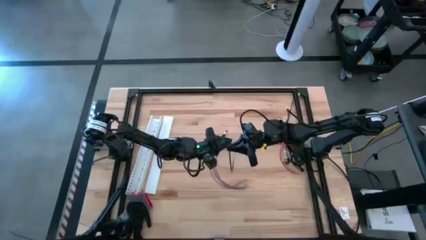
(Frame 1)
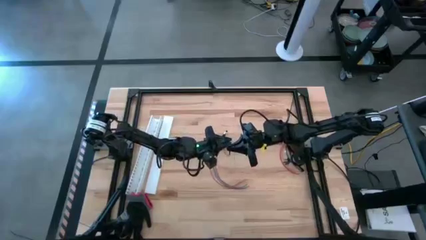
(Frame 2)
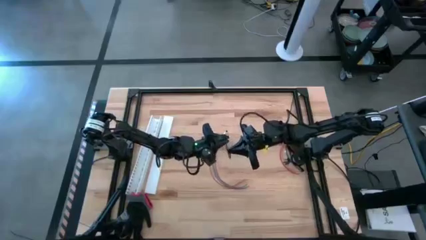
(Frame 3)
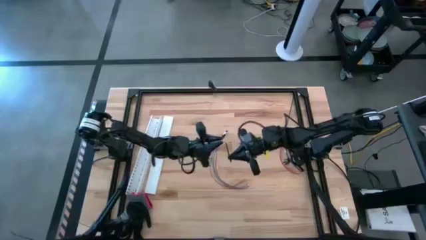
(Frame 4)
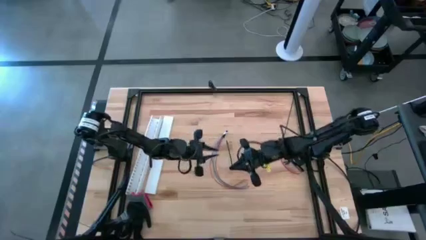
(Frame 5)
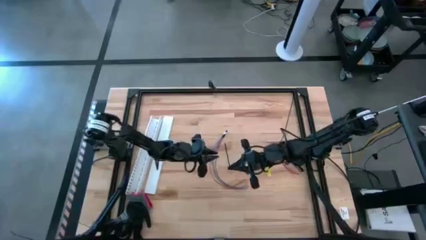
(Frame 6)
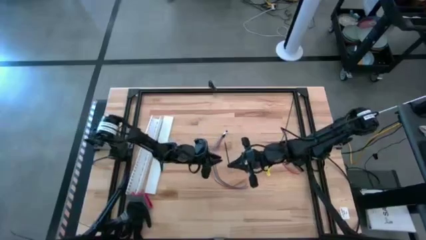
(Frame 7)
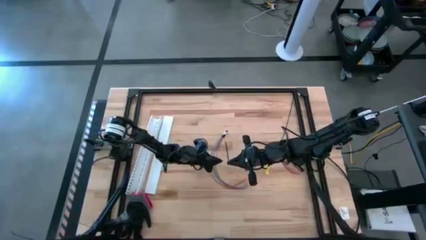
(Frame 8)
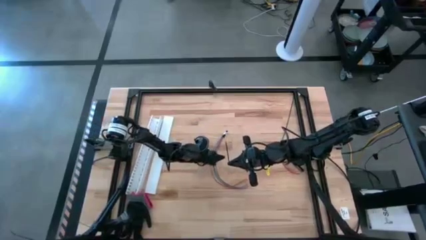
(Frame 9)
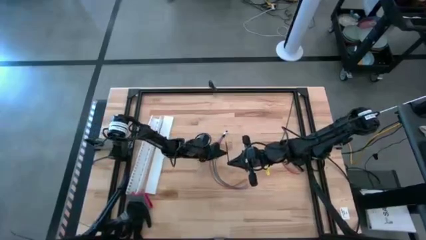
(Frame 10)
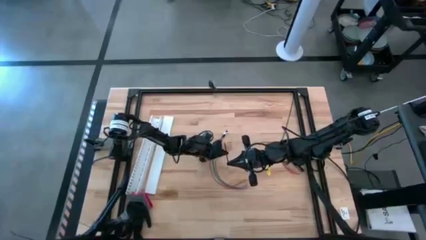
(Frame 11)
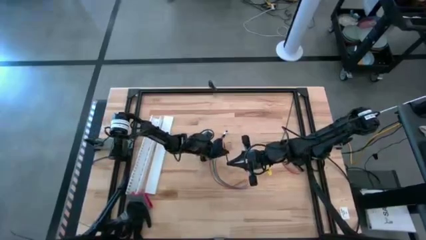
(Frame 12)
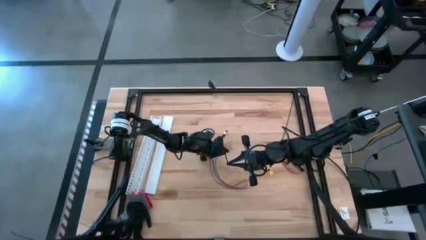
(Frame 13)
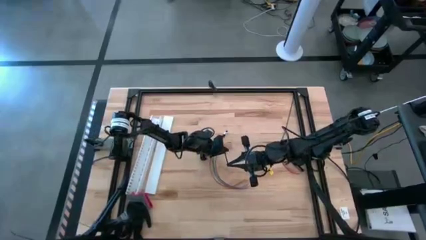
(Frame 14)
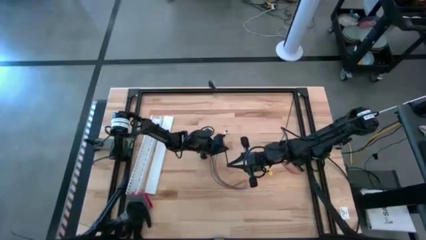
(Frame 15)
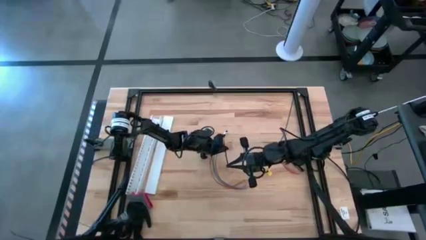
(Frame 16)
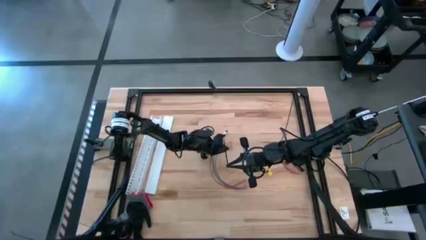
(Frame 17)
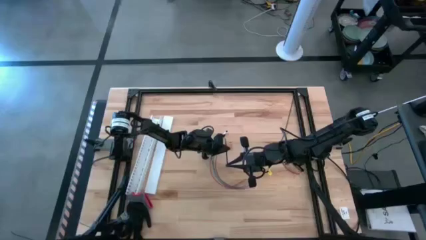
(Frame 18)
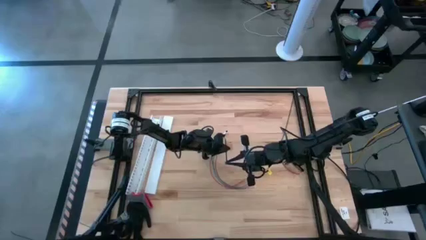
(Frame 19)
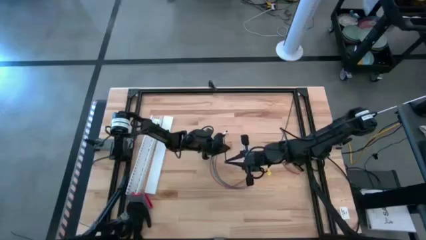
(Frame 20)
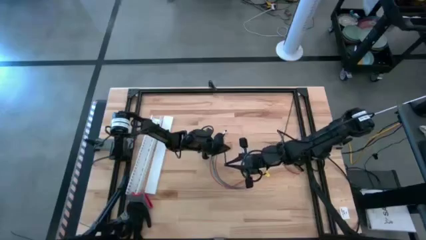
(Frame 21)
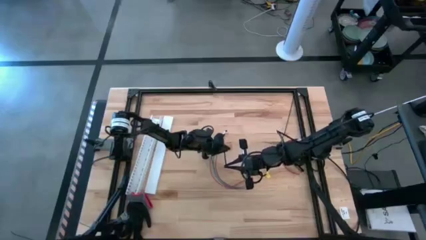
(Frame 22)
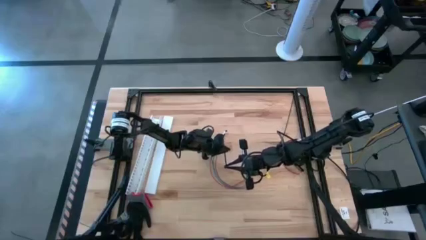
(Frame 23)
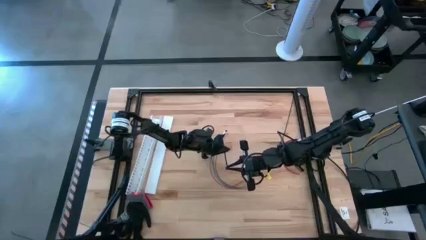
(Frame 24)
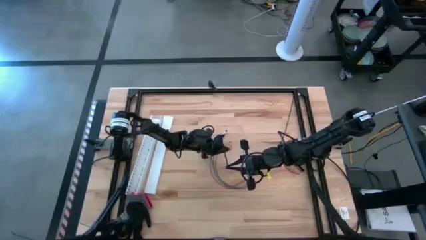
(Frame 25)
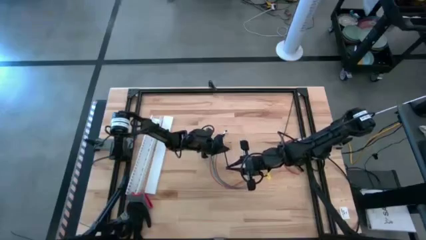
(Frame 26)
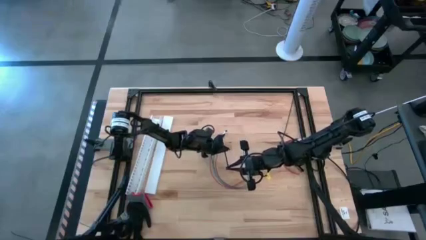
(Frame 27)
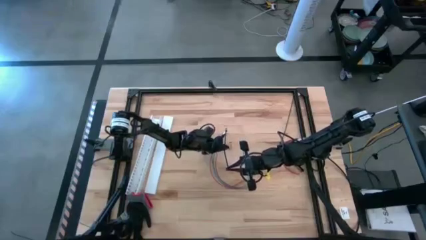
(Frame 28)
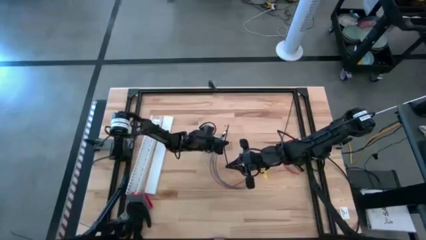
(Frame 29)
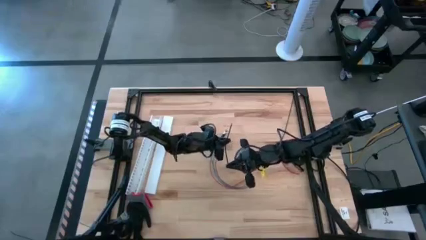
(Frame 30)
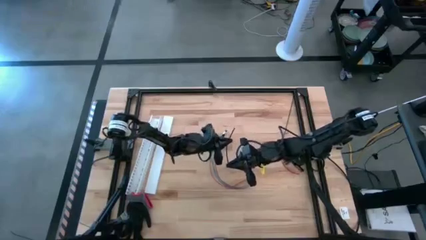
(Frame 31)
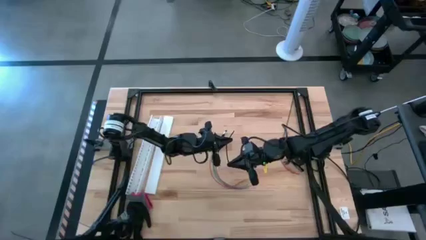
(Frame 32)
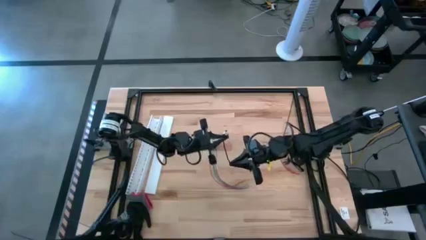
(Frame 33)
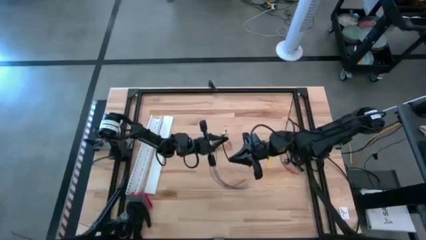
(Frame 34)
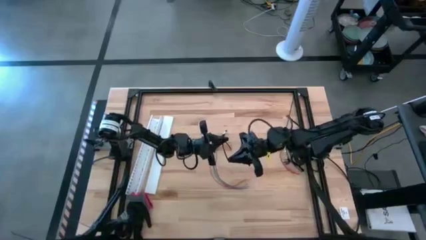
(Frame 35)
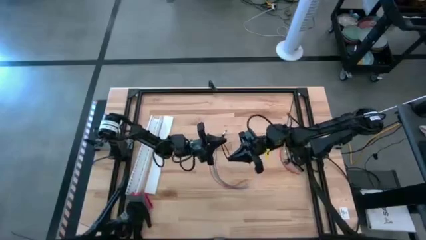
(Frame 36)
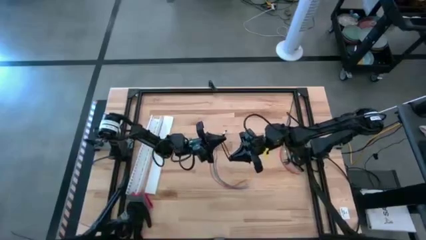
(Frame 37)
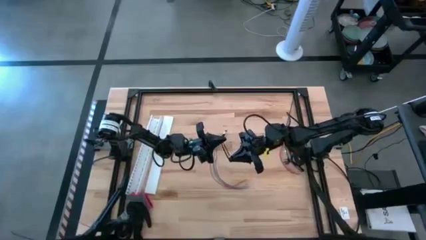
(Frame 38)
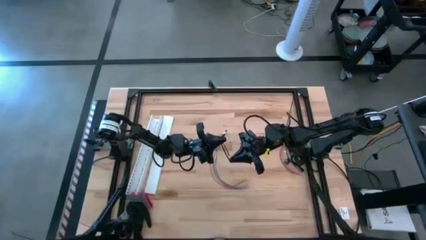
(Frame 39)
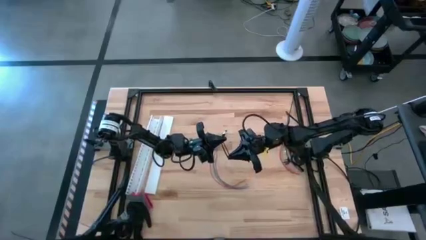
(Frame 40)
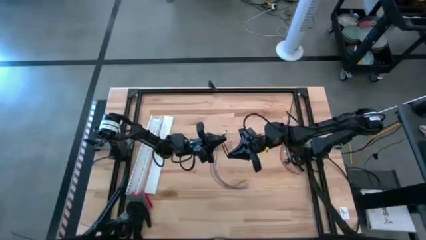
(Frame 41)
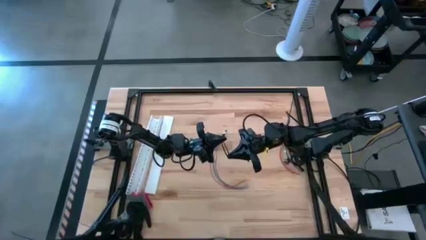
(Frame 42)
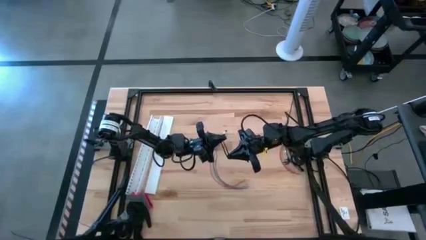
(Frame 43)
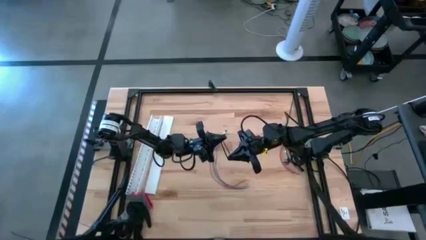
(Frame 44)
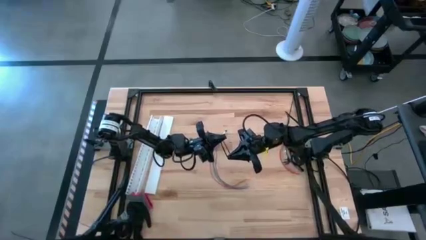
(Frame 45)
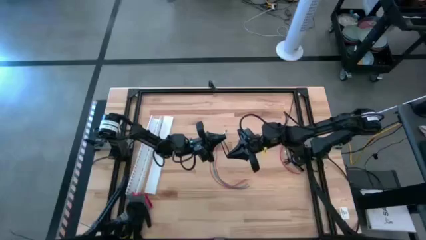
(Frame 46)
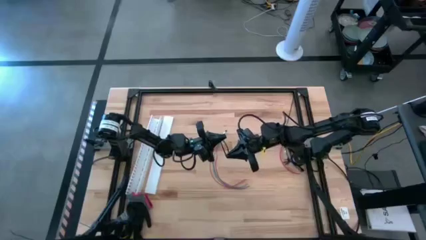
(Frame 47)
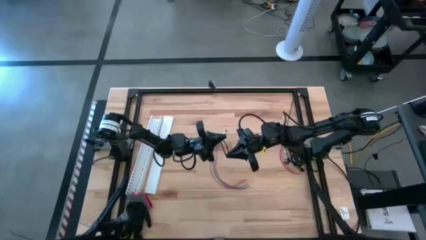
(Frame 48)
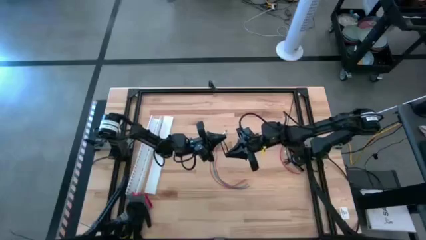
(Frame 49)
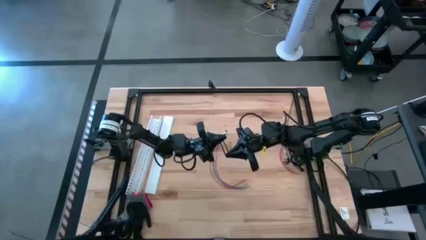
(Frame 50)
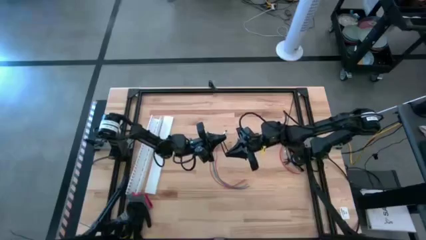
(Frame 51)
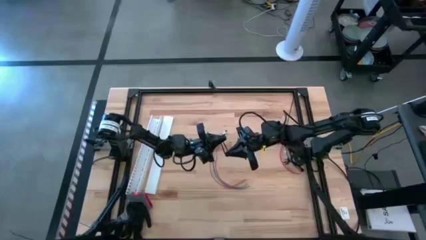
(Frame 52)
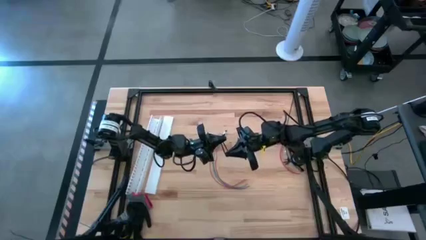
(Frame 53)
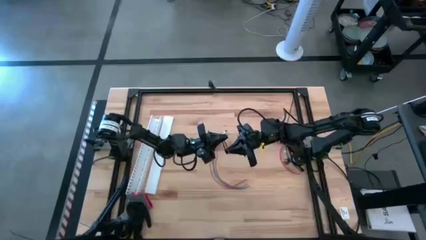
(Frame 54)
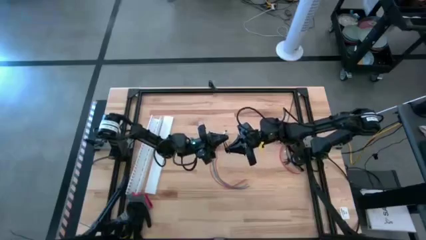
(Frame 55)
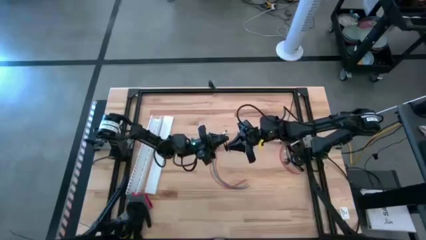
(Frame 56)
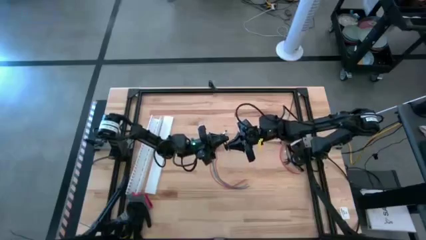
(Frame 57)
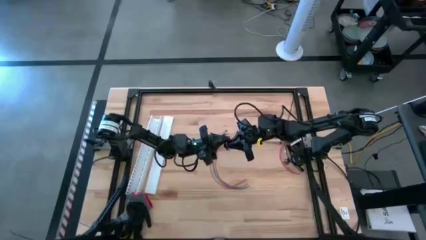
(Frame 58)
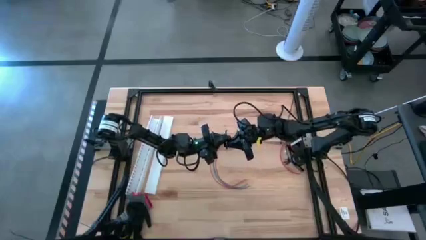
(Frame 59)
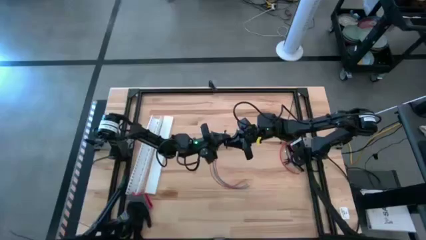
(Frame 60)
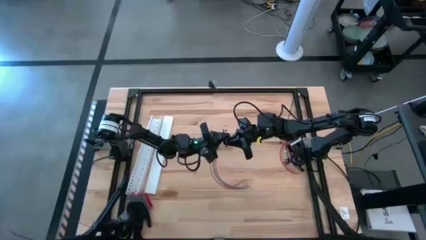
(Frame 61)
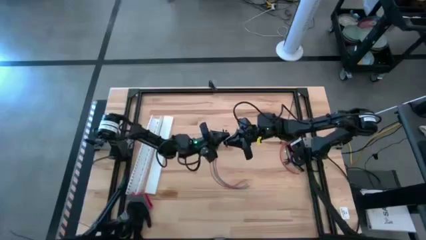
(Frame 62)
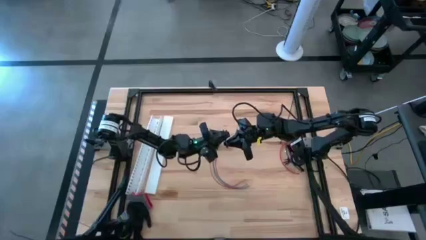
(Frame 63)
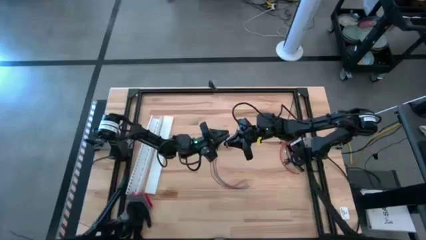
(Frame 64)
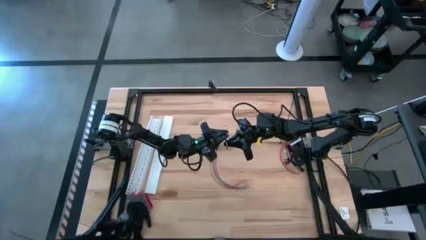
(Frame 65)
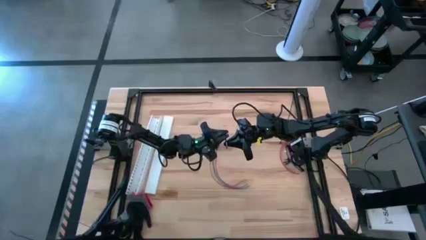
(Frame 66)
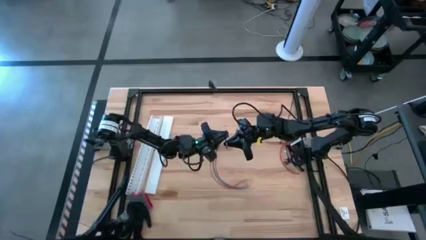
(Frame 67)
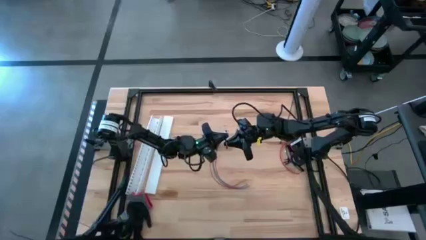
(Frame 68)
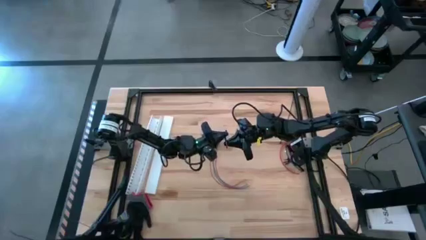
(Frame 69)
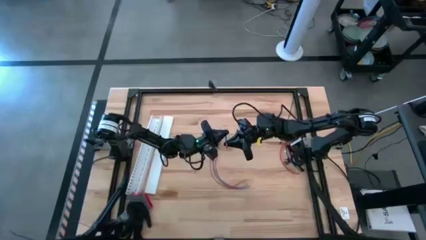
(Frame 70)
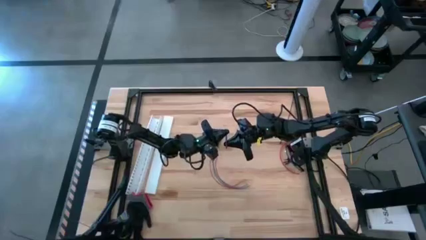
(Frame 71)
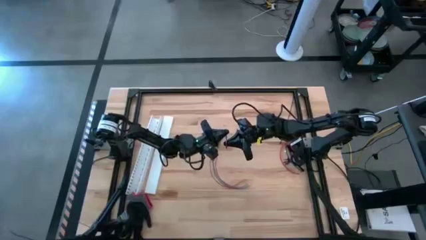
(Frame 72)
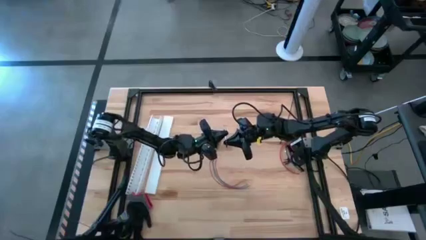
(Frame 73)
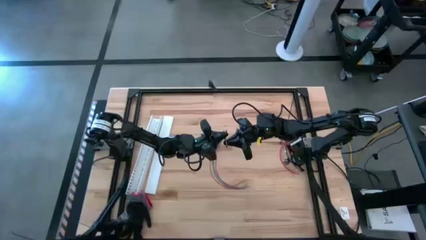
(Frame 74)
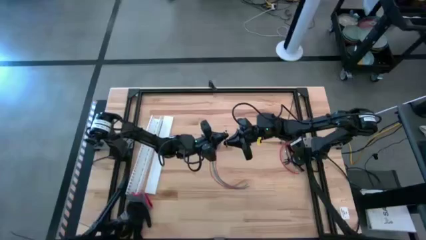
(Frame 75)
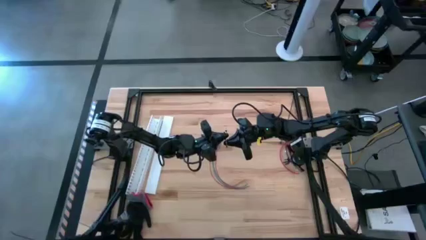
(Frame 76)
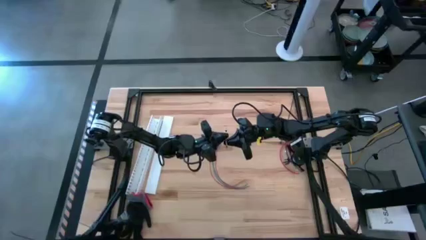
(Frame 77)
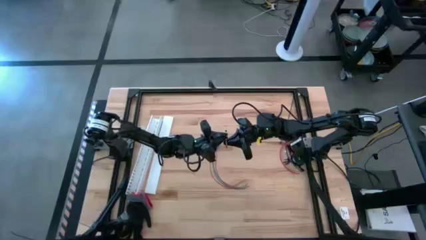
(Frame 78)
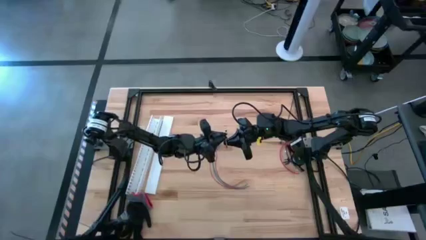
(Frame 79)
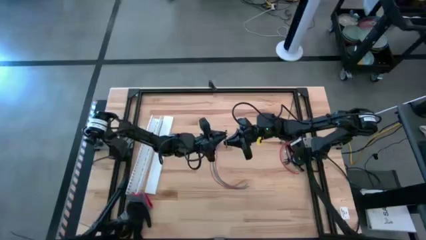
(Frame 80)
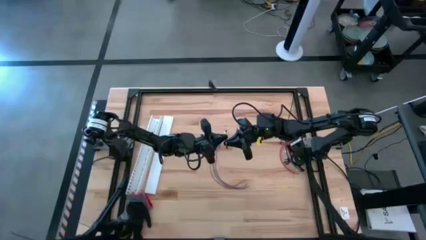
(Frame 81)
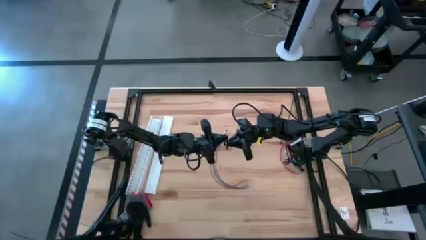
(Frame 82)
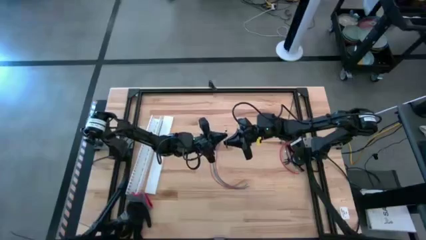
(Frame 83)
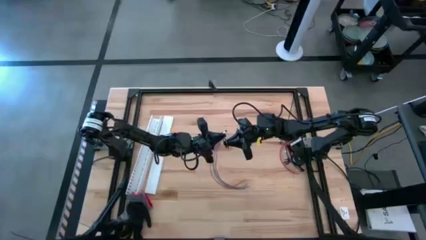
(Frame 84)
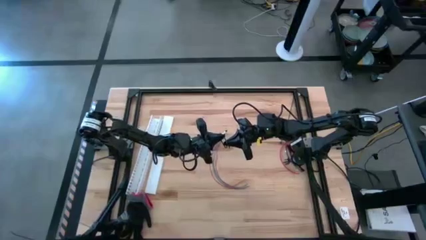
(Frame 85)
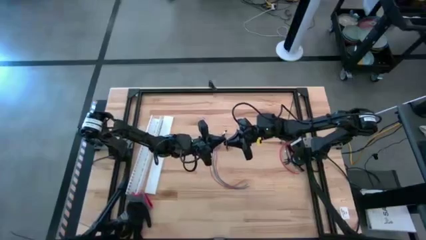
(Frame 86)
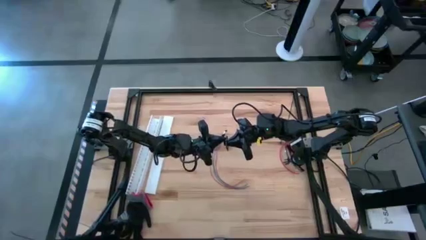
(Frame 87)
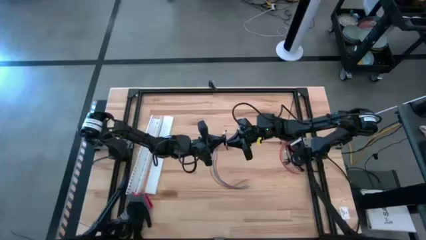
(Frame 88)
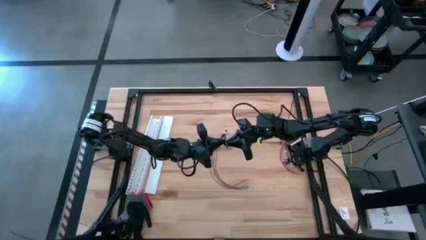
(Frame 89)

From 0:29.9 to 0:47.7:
Task: Ziptie cables
Insert the bottom black ziptie into the black ziptie lock
